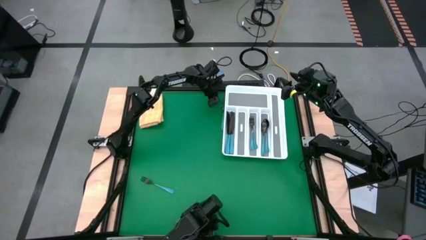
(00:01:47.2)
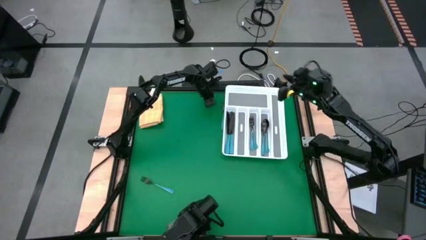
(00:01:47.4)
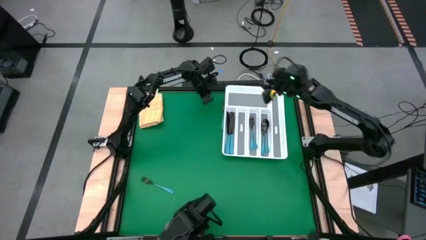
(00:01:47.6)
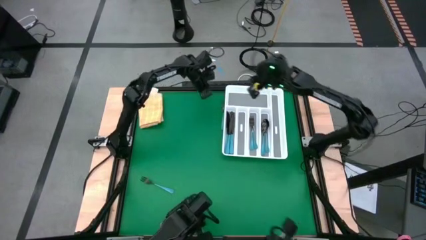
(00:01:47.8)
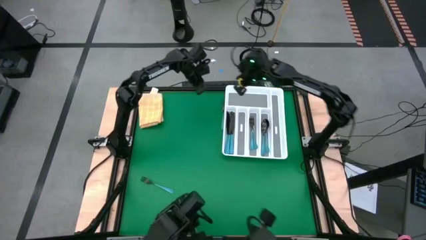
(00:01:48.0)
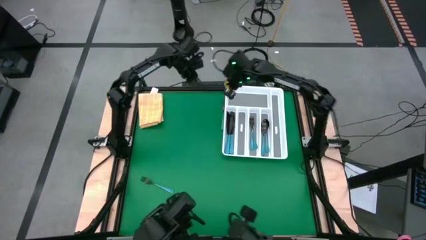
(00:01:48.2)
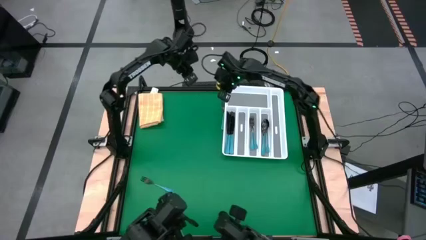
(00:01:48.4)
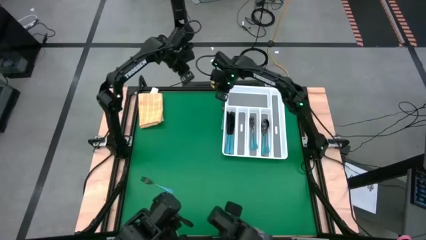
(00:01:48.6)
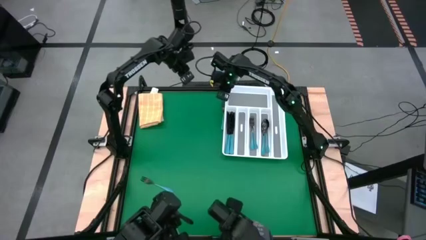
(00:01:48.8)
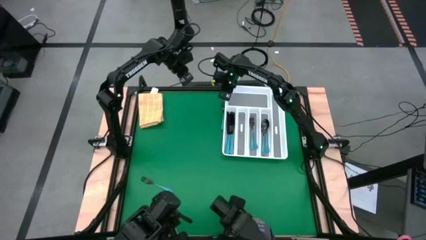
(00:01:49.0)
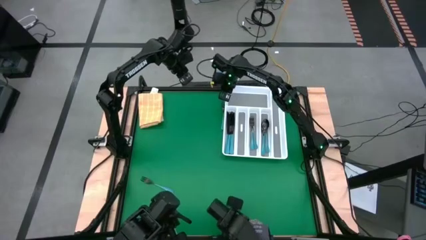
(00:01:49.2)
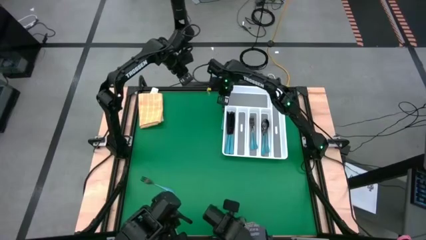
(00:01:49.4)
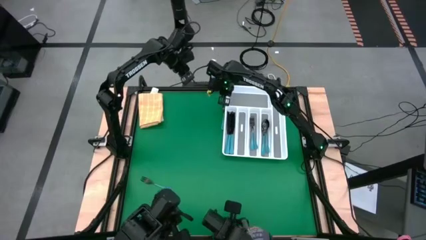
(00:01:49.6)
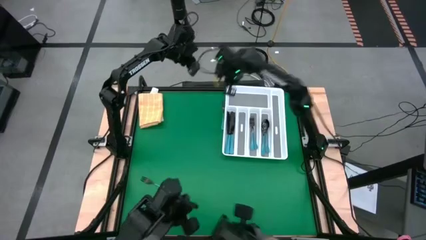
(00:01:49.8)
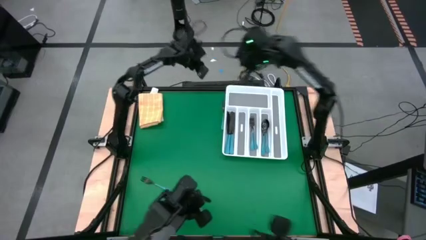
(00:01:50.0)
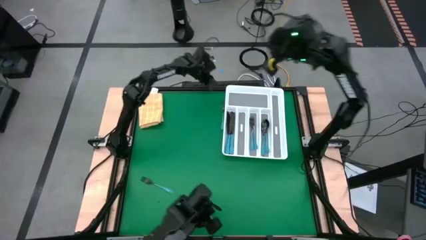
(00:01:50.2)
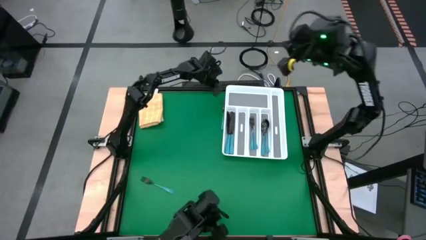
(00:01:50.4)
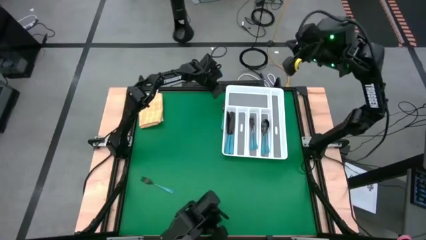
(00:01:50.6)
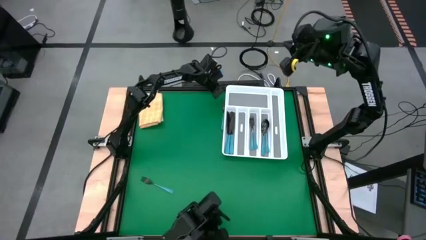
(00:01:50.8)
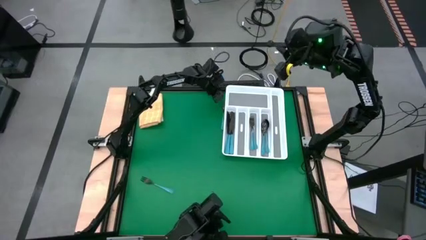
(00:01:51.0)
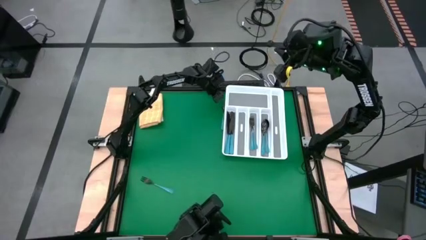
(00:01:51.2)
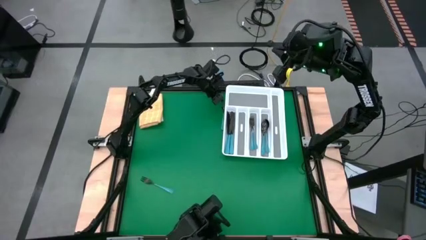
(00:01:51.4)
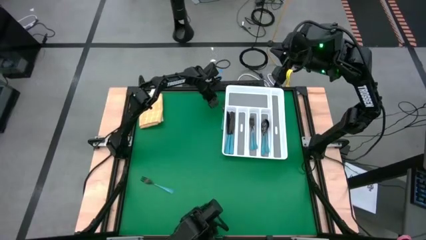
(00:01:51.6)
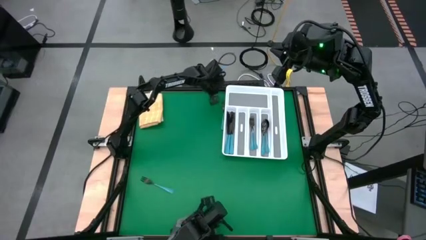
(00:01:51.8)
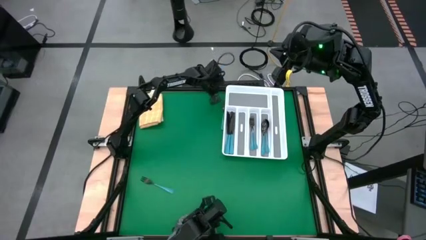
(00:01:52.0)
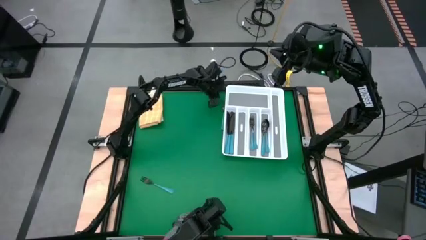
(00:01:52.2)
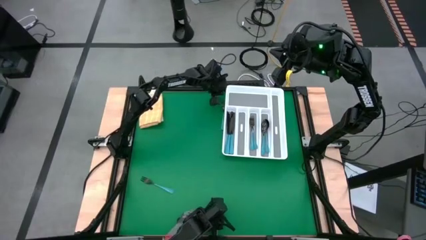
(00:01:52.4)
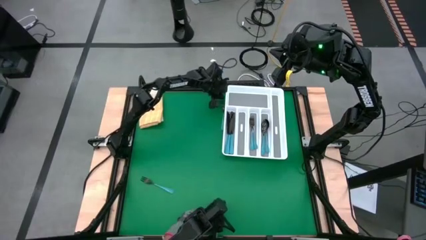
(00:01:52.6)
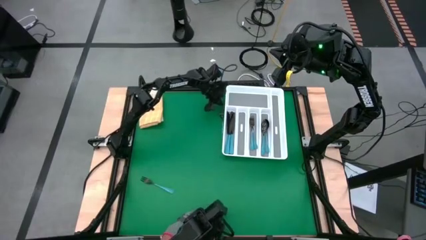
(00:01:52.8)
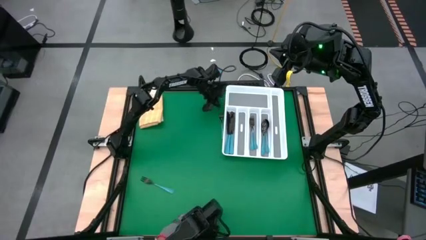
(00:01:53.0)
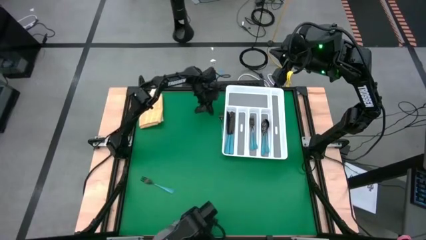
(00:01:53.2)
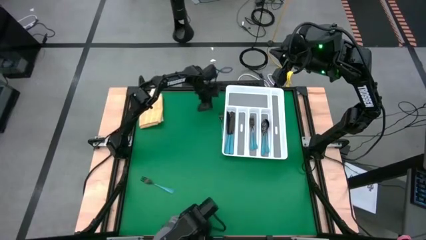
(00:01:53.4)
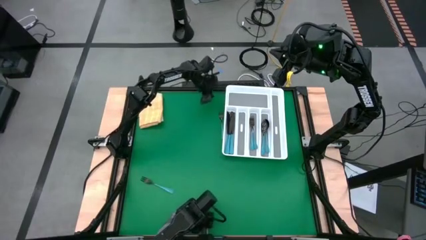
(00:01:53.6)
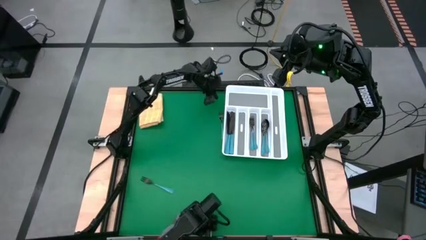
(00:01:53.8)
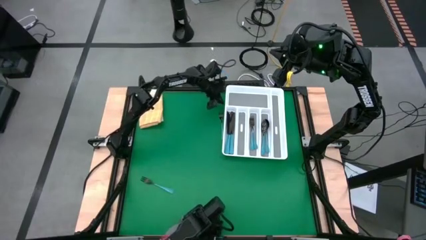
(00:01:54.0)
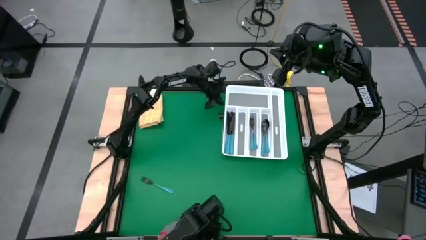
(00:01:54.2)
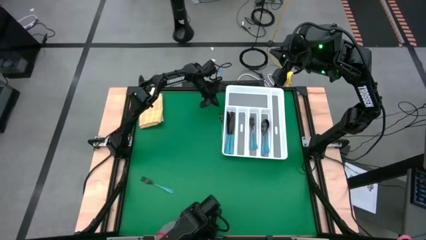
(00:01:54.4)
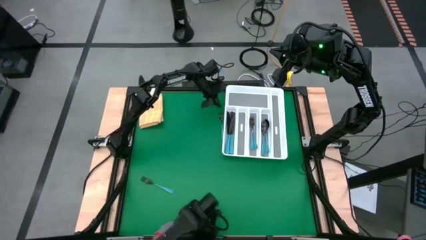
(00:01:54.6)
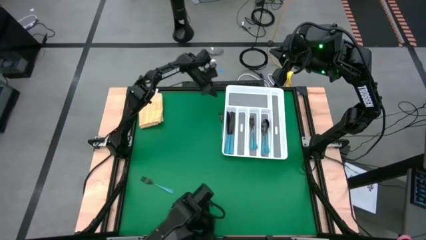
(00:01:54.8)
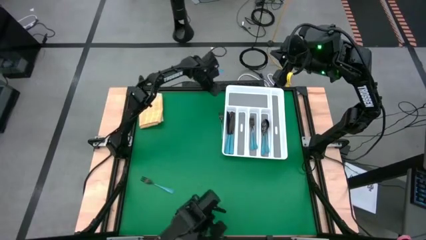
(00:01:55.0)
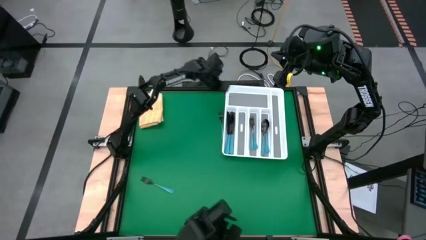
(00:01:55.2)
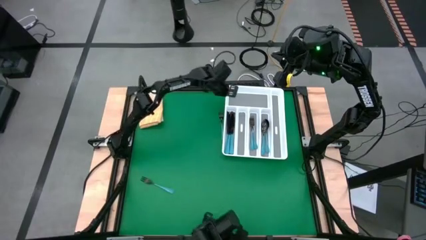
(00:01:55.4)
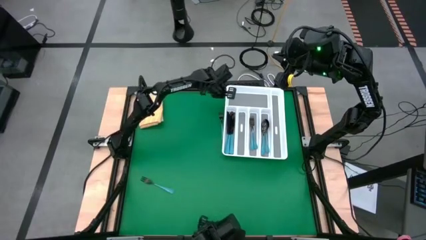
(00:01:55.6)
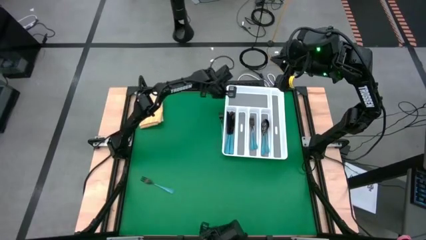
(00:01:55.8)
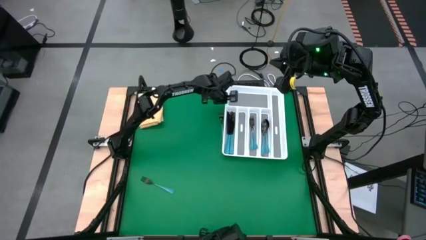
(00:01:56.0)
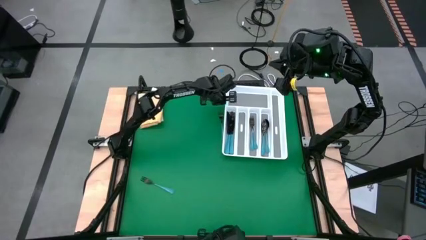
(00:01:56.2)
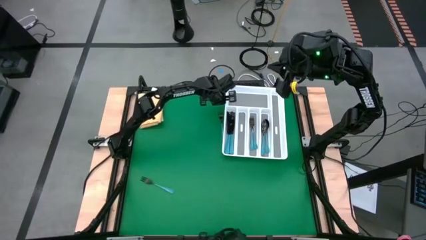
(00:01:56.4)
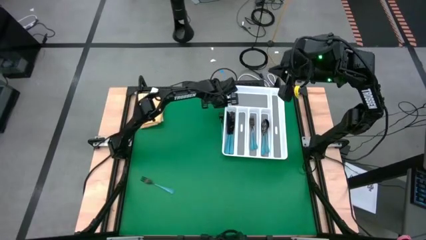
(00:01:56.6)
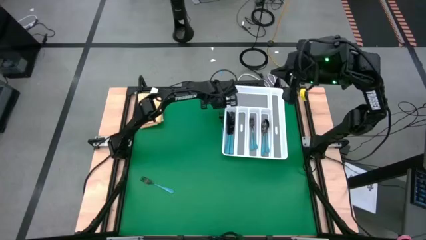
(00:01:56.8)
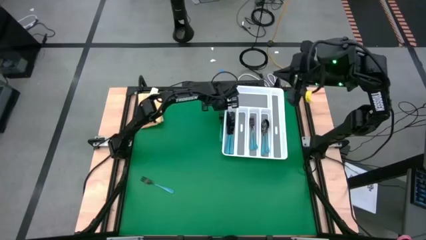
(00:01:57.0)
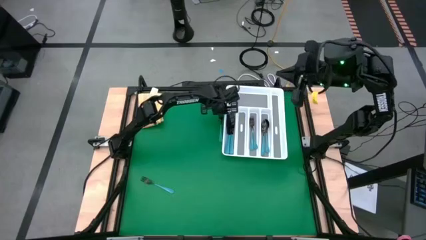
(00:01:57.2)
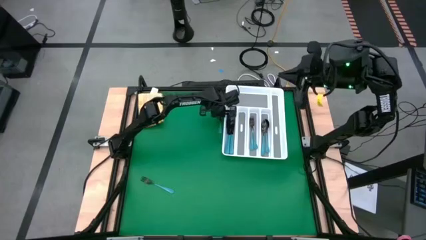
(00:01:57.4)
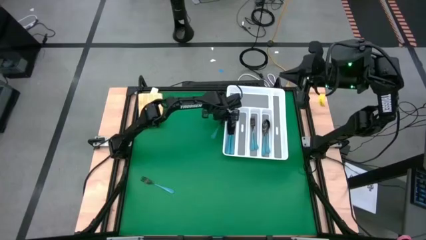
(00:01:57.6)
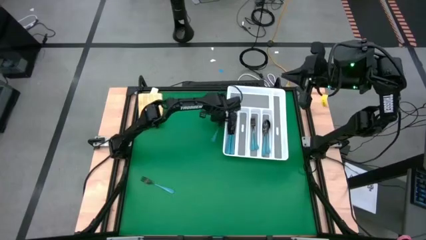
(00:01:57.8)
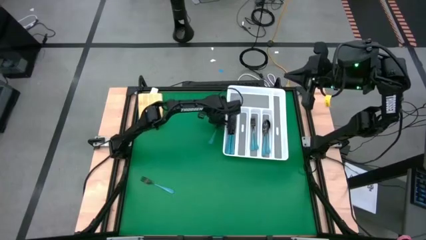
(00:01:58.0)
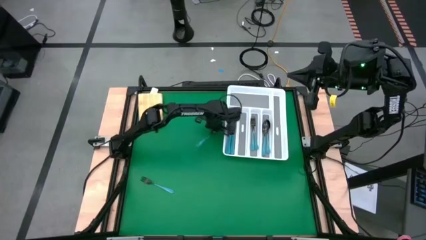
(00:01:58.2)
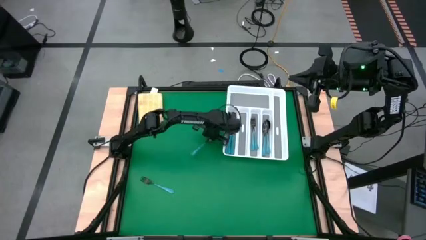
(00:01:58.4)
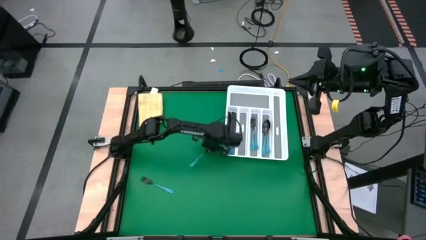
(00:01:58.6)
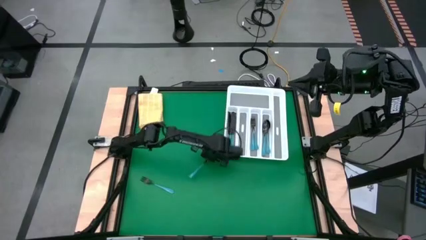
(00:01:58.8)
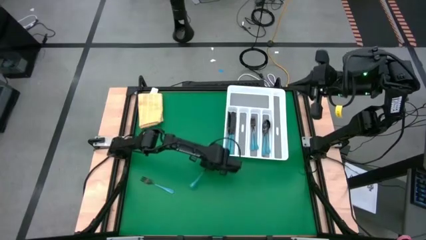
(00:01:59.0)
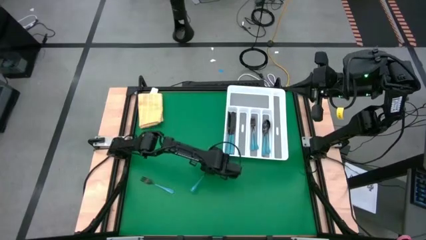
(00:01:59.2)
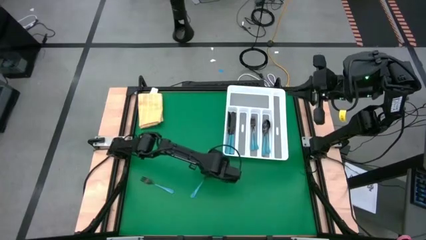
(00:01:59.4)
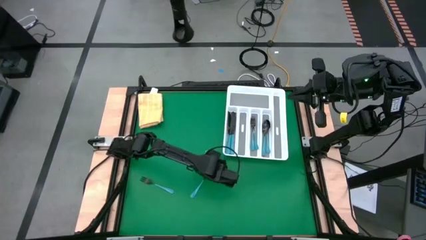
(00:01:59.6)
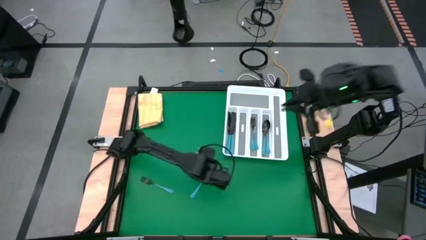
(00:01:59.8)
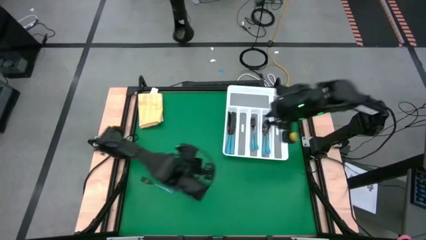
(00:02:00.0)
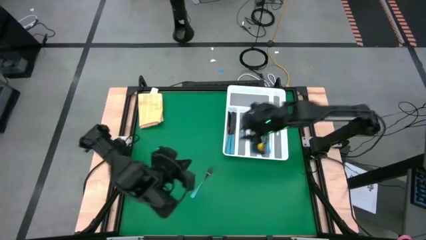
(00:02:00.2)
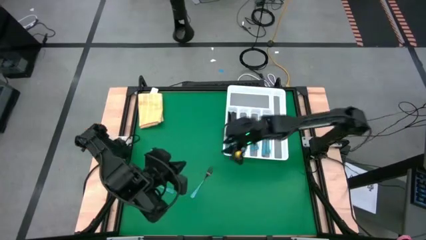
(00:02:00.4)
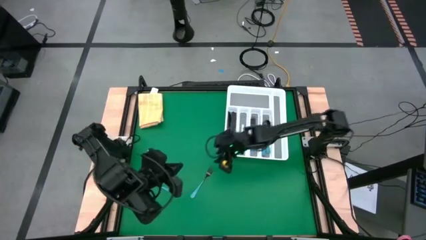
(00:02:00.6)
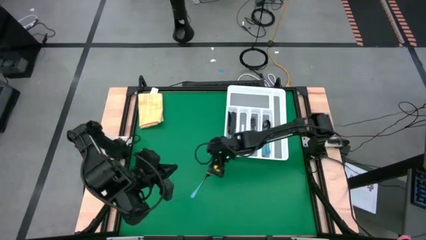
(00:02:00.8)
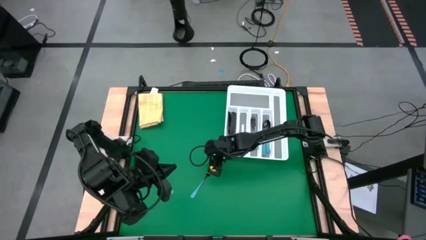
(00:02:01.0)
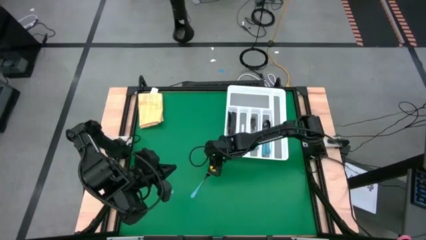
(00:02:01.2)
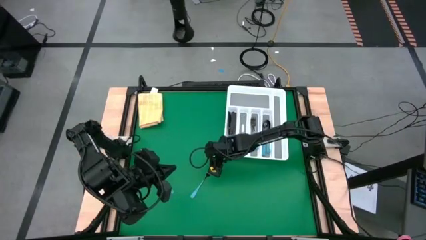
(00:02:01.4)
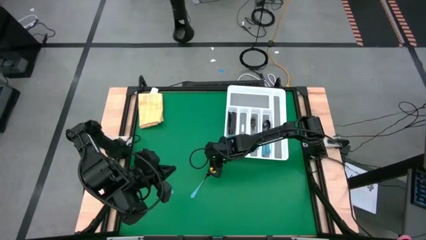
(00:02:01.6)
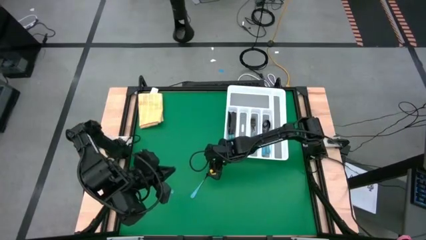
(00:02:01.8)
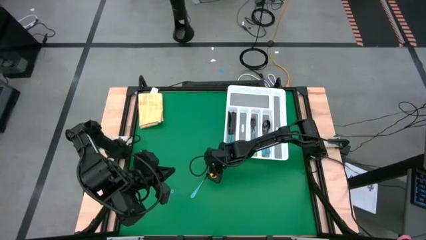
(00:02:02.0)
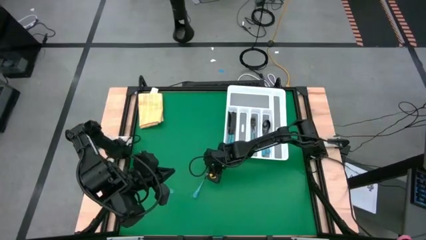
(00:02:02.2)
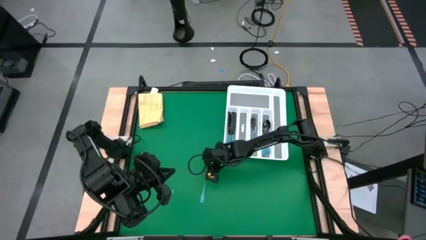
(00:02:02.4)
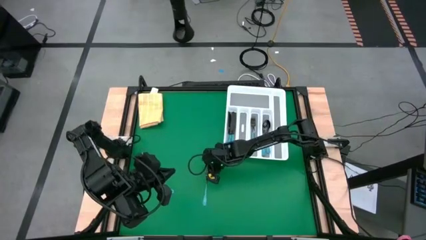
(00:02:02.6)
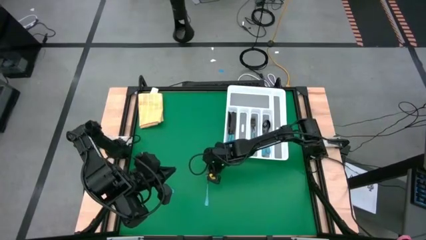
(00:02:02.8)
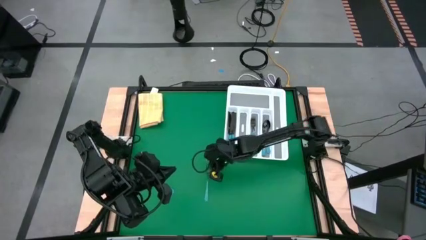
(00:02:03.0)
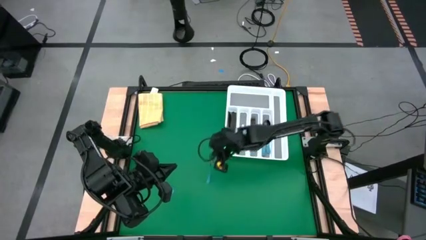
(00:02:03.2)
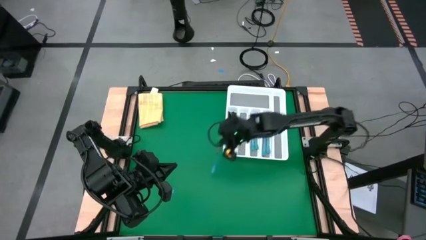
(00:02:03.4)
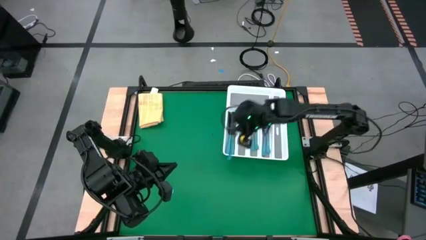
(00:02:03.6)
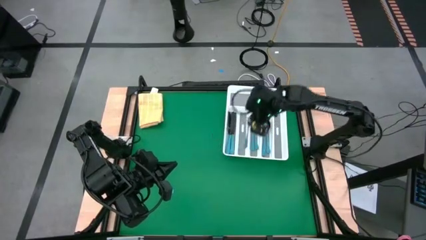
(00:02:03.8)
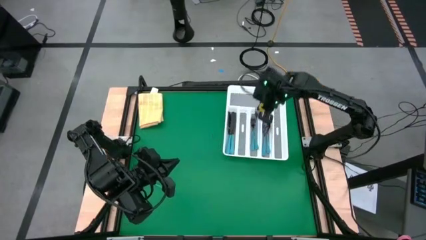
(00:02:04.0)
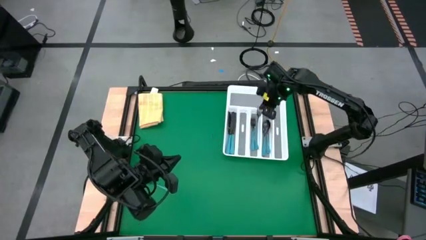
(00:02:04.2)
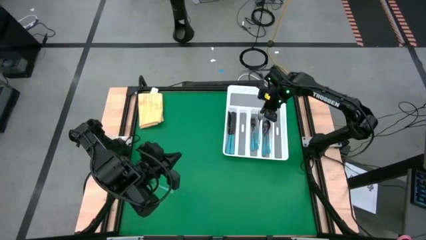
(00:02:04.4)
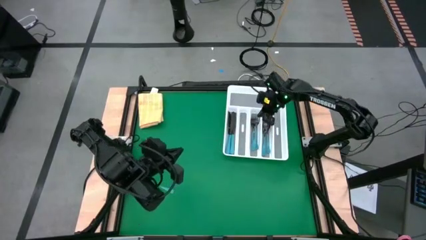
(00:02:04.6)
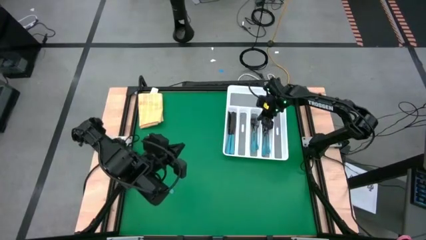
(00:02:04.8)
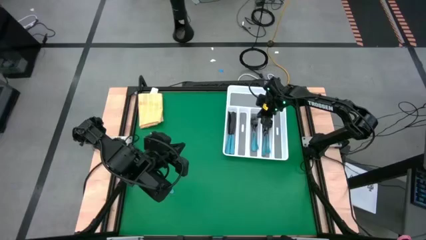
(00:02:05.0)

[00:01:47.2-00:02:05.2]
Task: Sort silverware
Put the blue fork into the white cutlery tray
